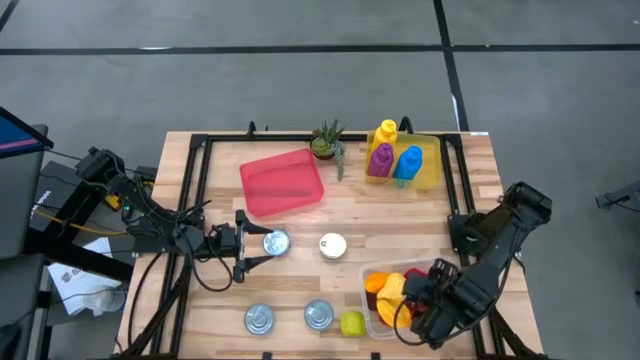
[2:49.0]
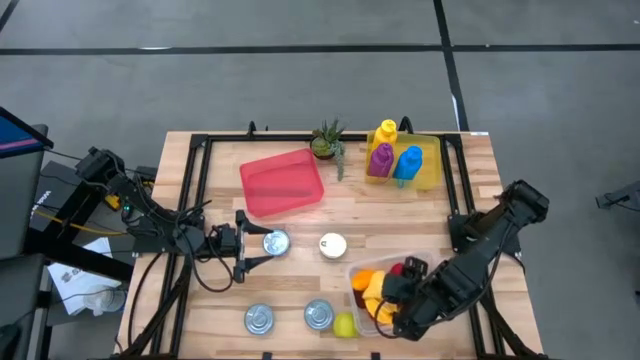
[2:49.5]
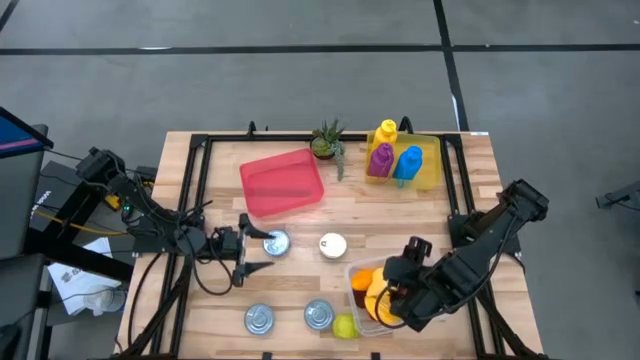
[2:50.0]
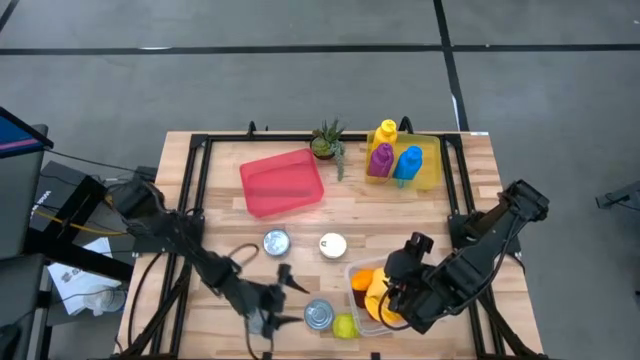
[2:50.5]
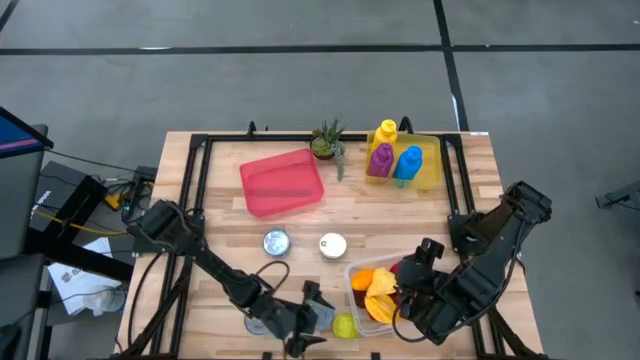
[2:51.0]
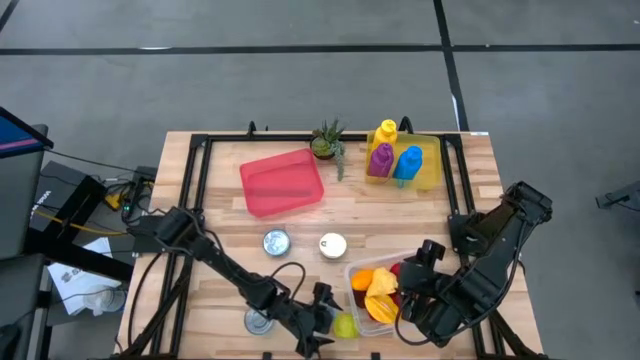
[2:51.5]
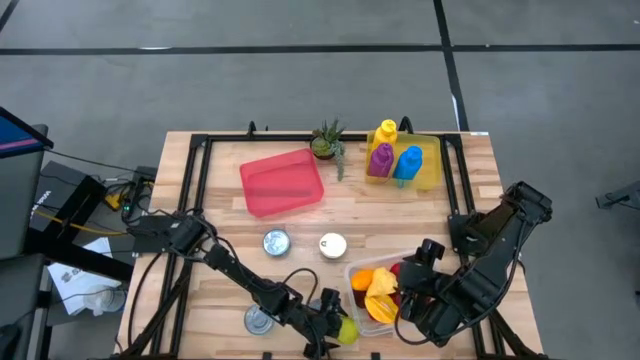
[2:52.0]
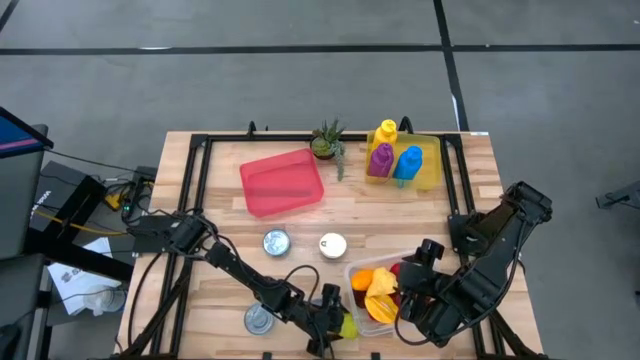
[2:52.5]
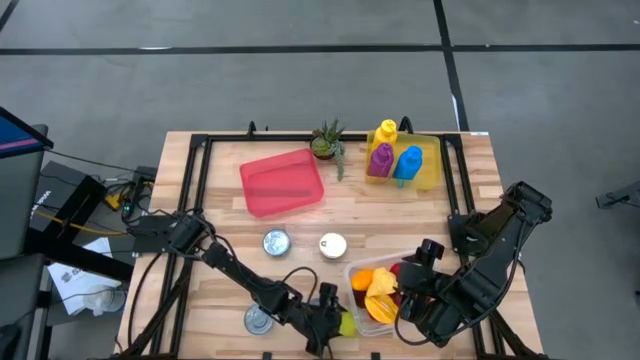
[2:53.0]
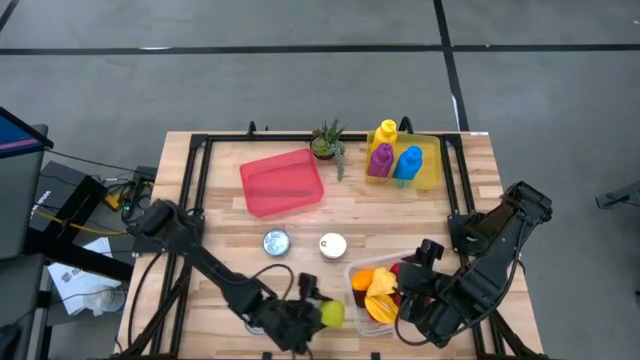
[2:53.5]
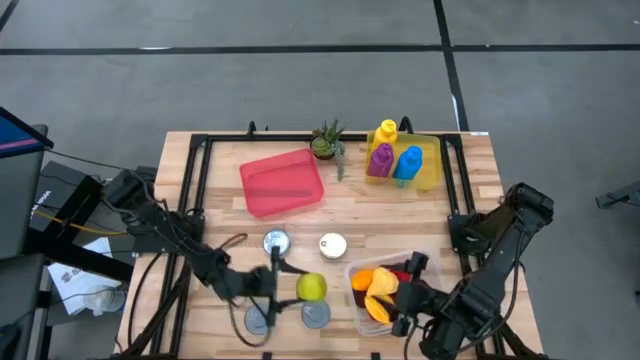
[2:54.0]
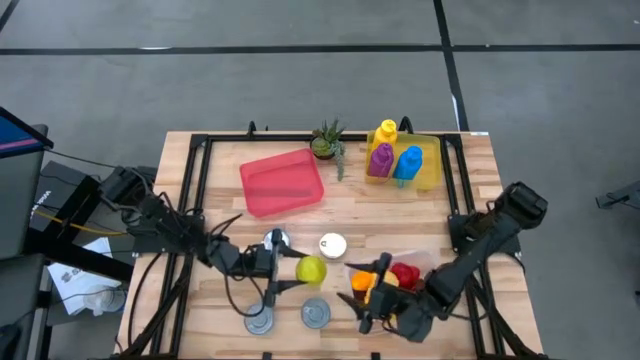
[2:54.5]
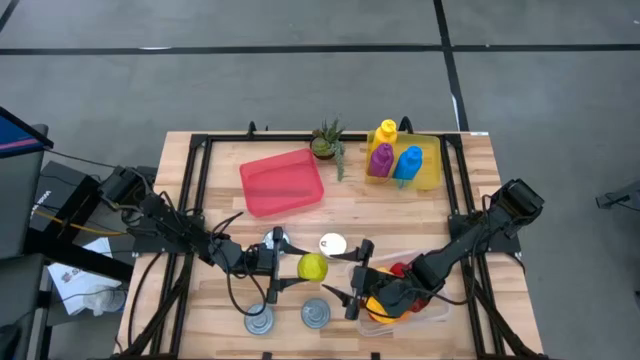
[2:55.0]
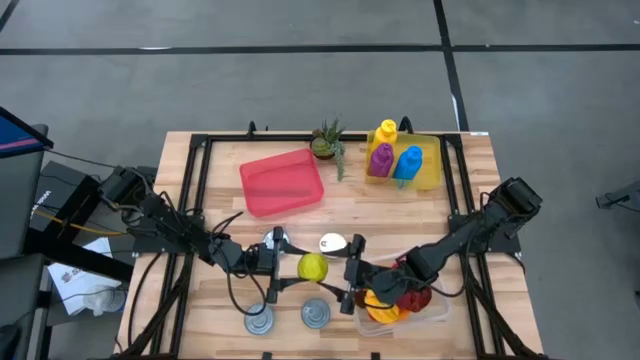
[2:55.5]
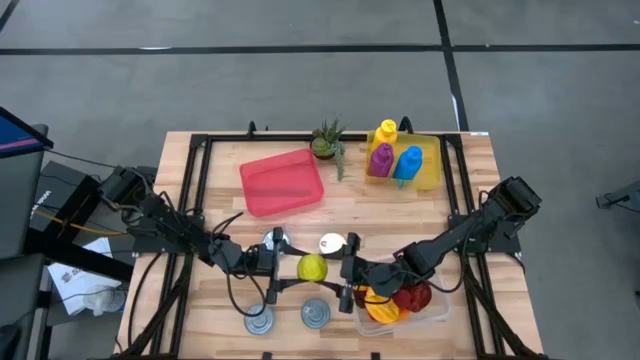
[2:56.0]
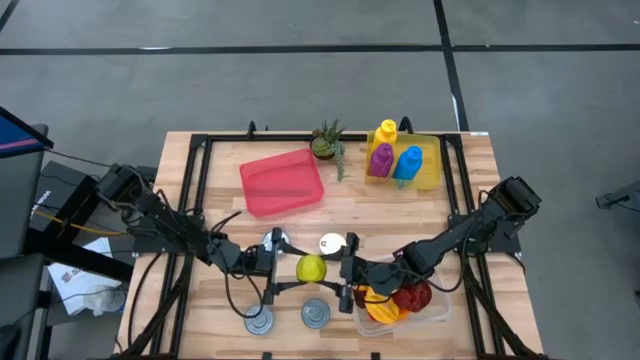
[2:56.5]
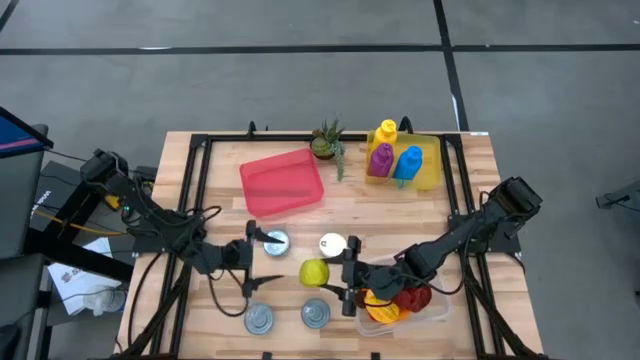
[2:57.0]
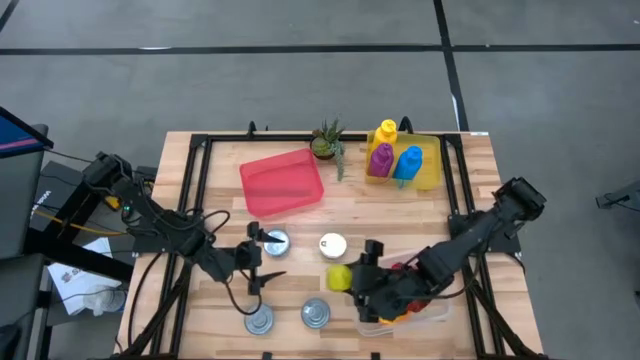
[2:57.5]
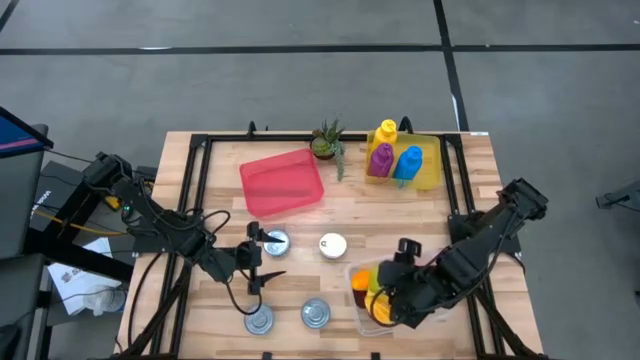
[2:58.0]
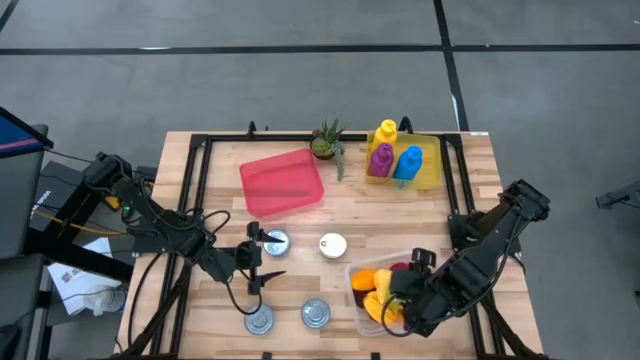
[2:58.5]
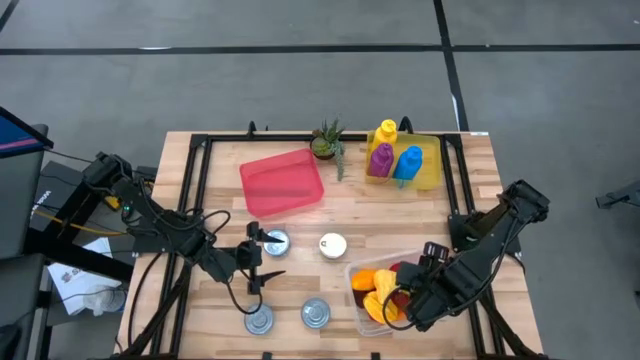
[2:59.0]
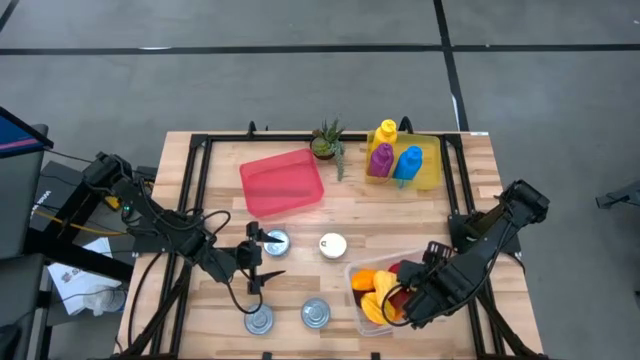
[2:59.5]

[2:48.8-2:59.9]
Task: Pick & Place Food Item
Put the green apple into the transparent bin

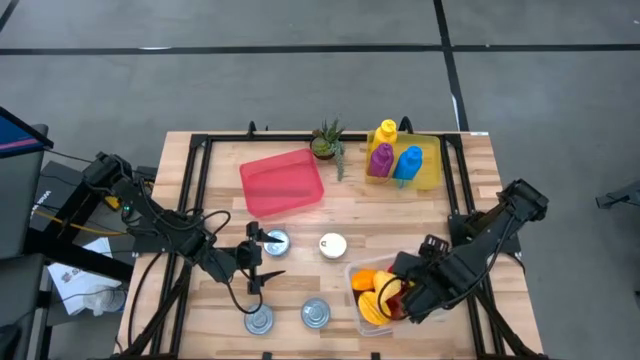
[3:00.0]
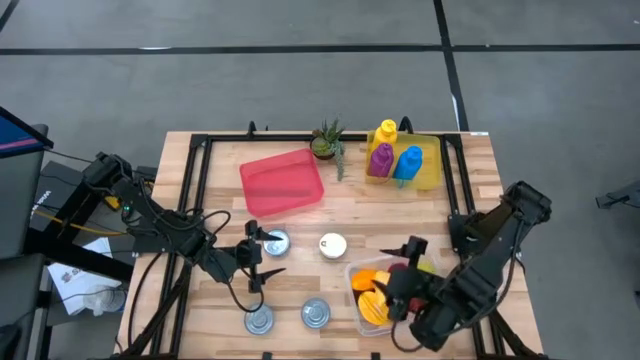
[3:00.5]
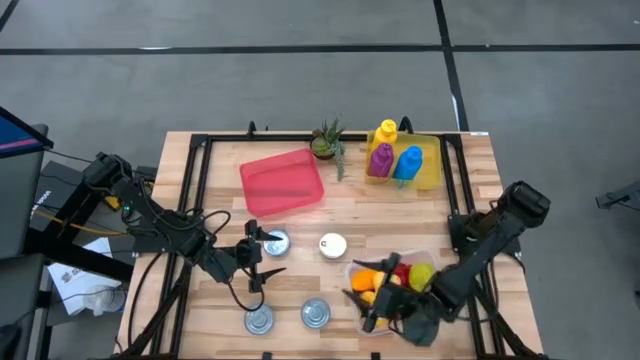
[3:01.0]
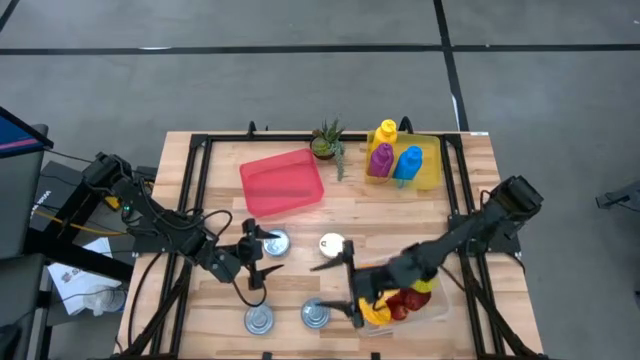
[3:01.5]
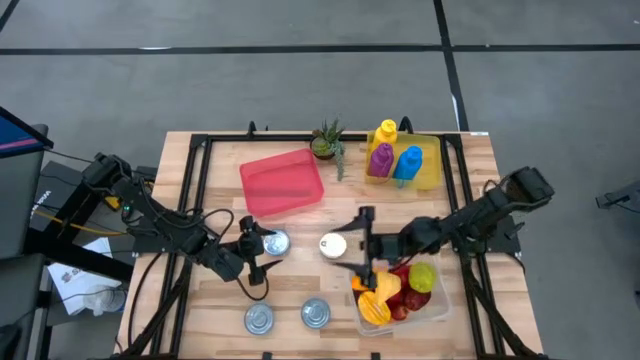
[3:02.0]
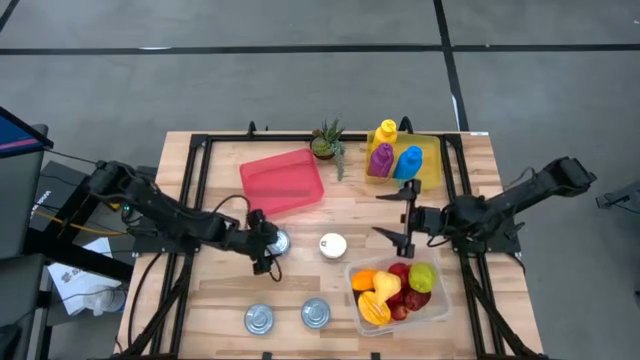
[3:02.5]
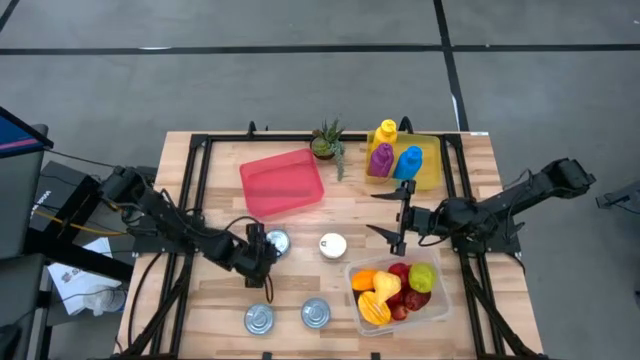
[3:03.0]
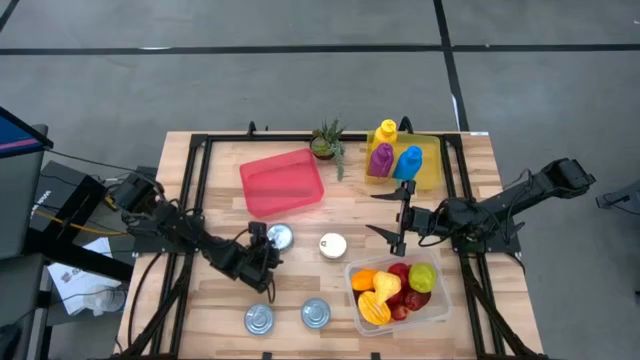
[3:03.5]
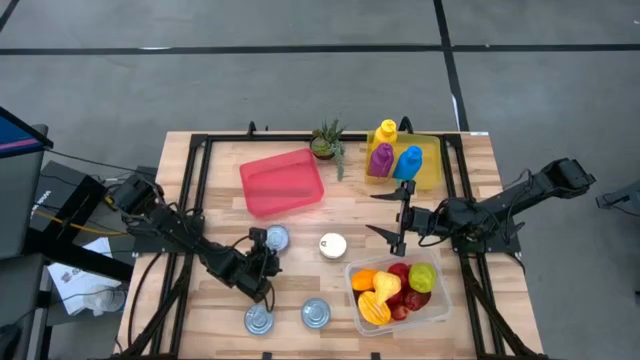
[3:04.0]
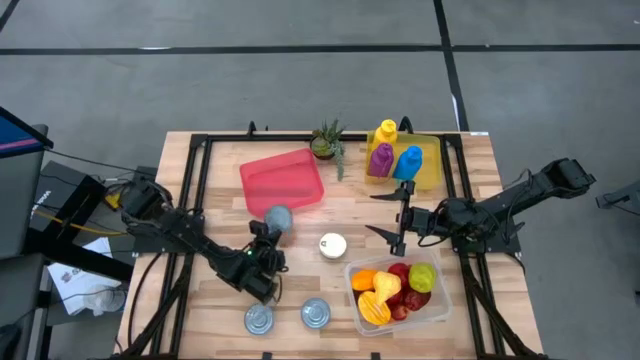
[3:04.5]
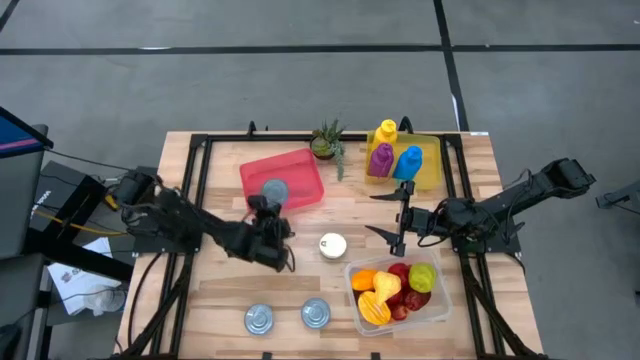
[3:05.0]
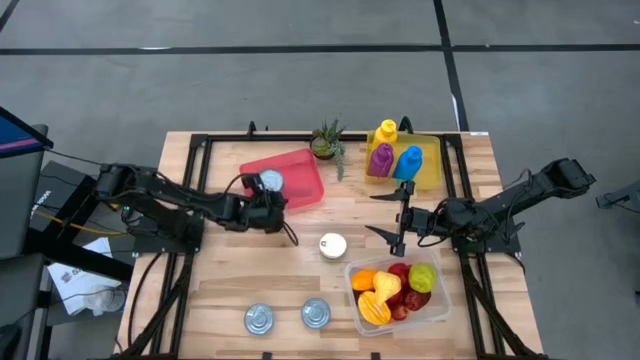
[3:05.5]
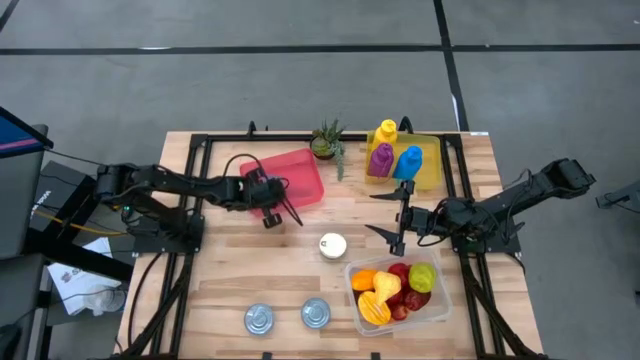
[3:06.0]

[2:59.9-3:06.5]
Put the blue tuna can into the red bin

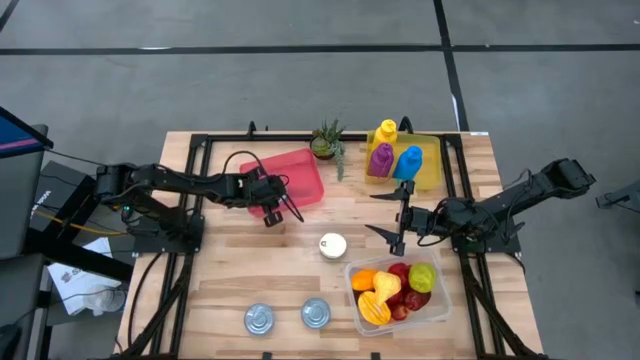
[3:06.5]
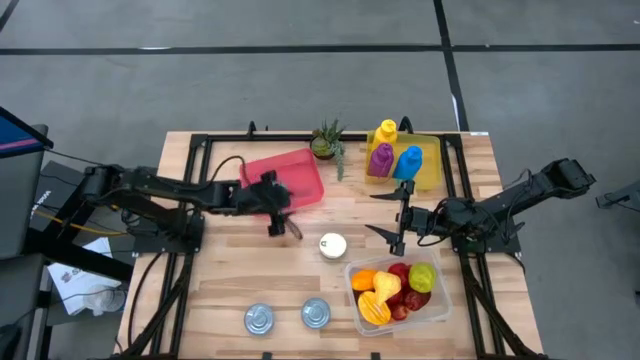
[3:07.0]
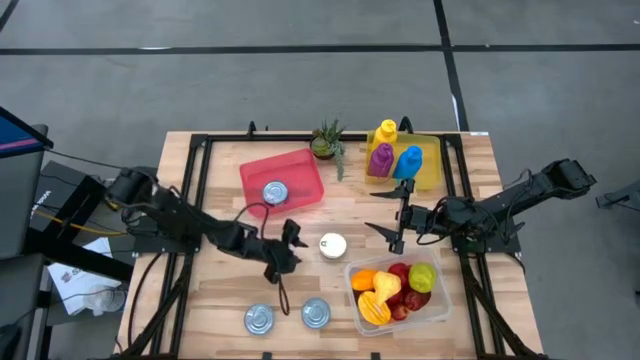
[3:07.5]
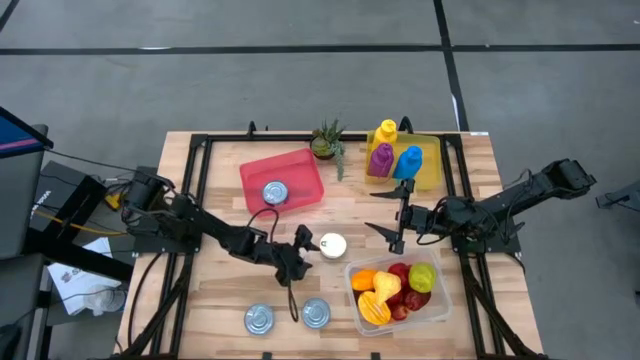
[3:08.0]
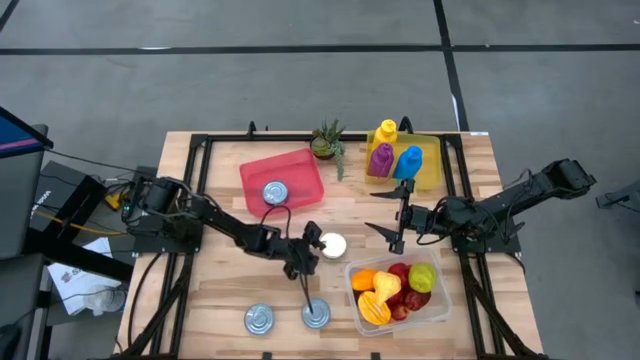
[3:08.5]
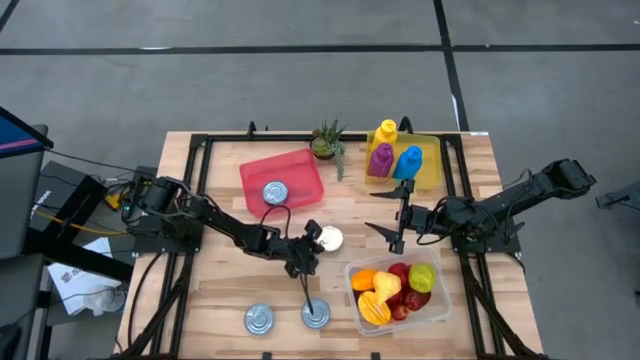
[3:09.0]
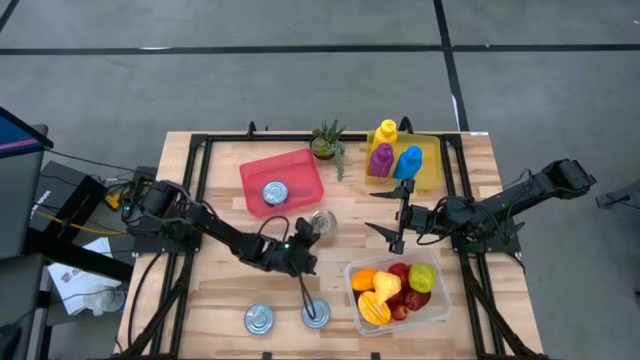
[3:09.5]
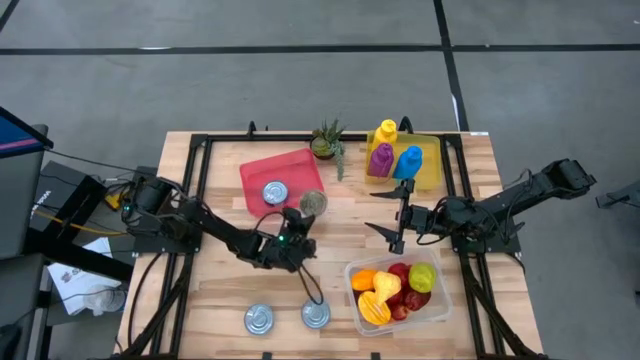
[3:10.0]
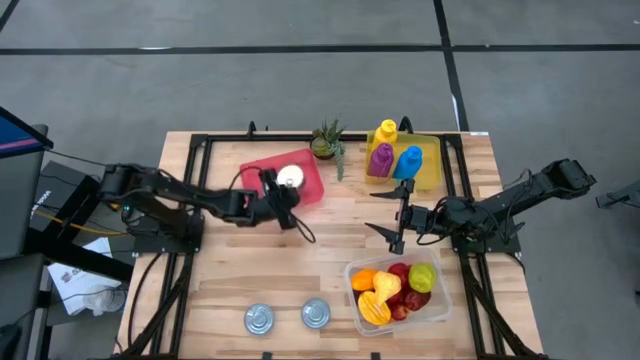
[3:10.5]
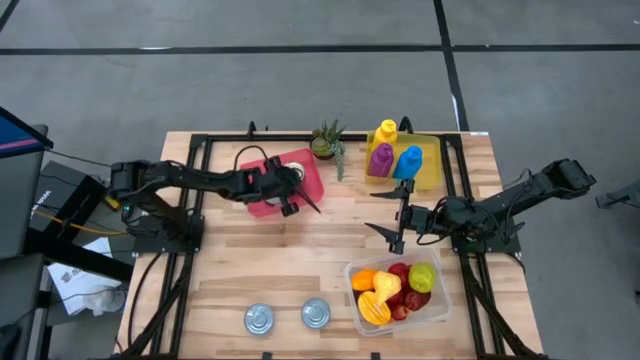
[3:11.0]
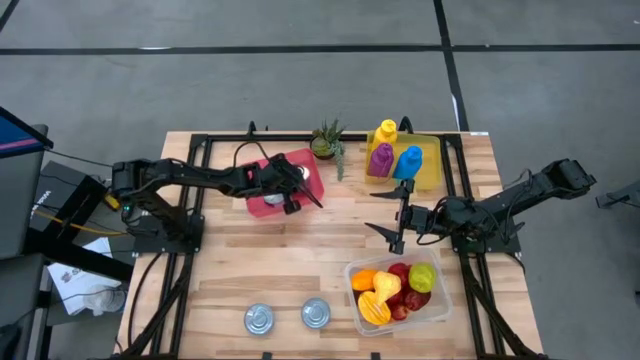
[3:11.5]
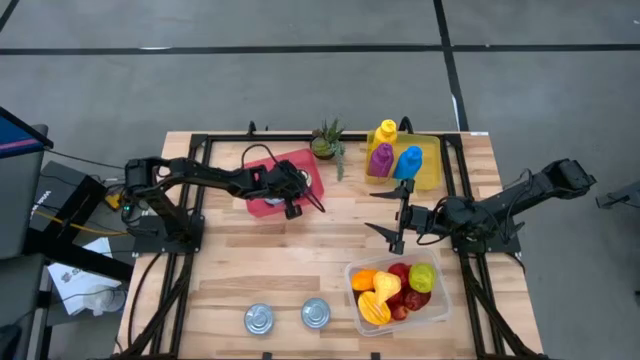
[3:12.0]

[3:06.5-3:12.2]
Put the blue and pink tuna can into the red bin
